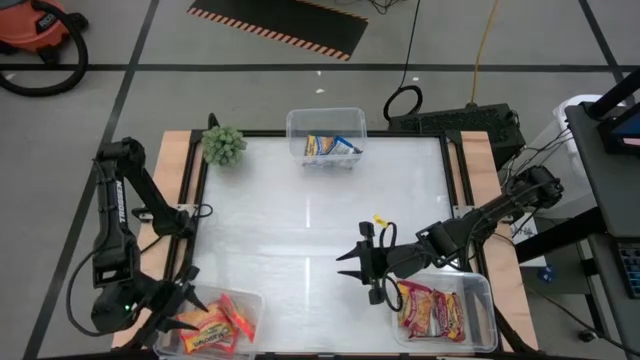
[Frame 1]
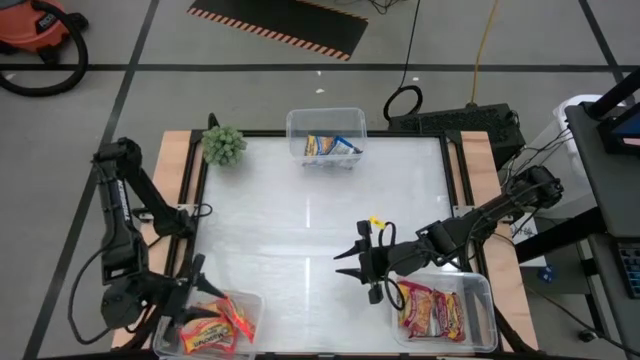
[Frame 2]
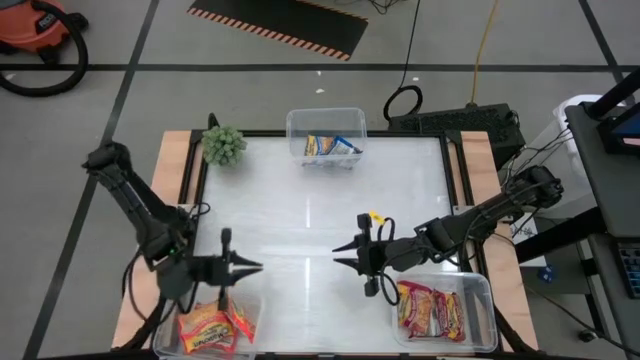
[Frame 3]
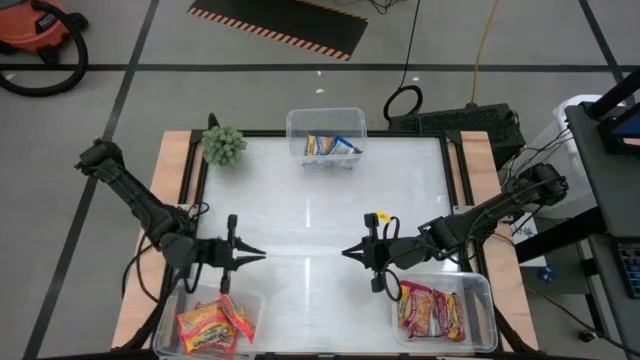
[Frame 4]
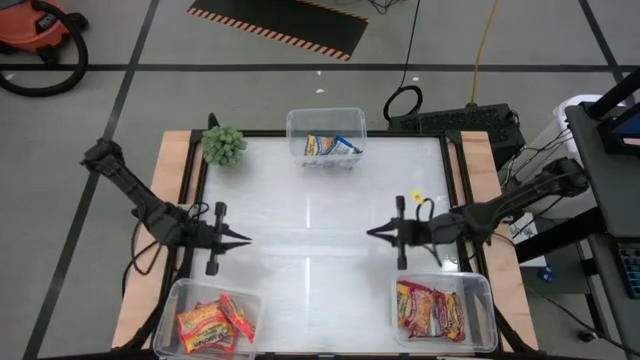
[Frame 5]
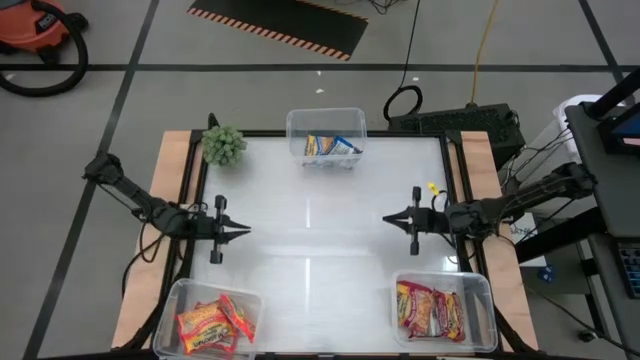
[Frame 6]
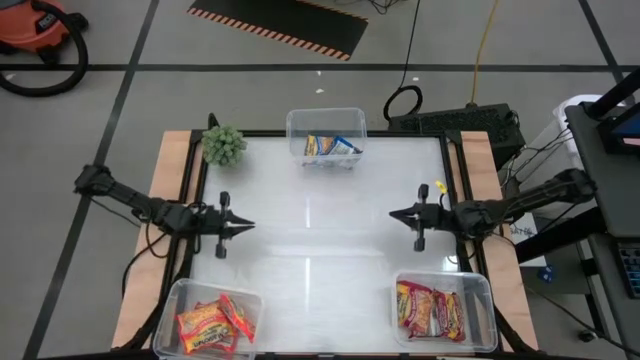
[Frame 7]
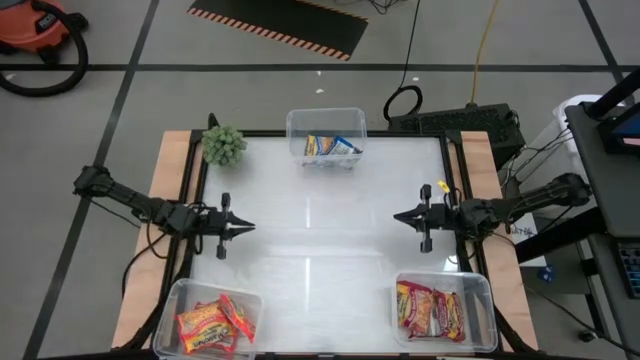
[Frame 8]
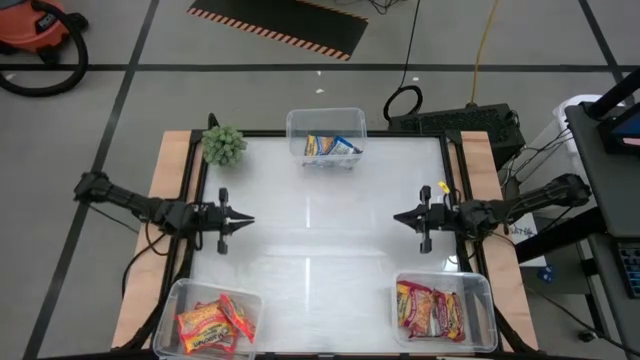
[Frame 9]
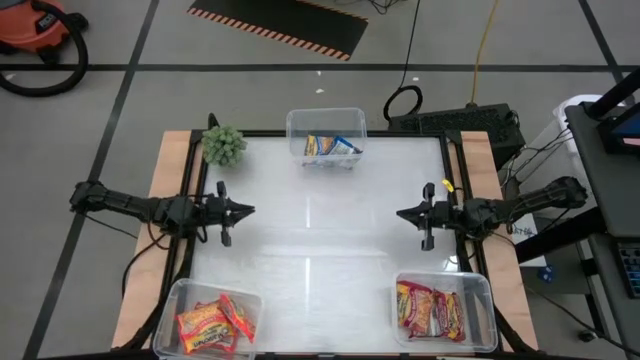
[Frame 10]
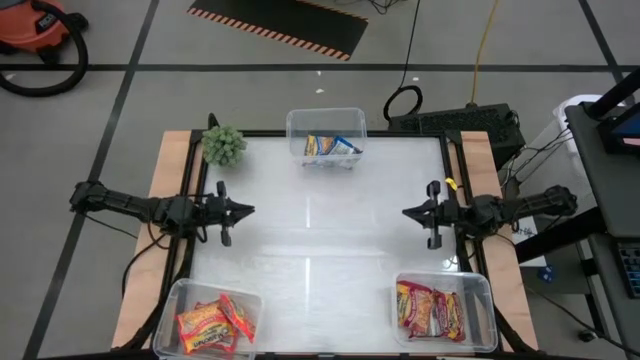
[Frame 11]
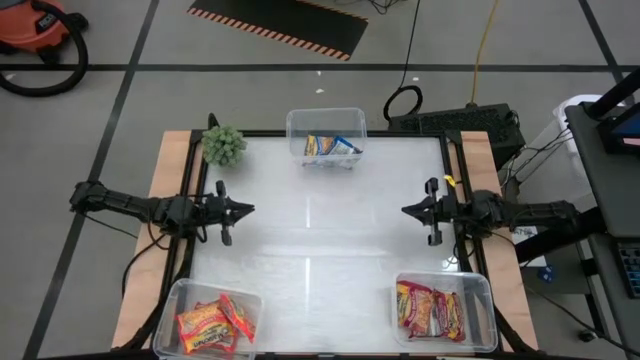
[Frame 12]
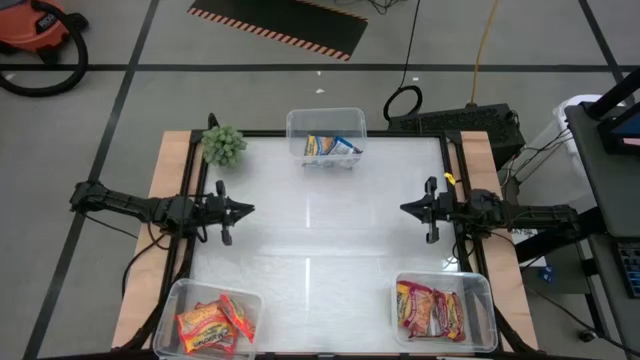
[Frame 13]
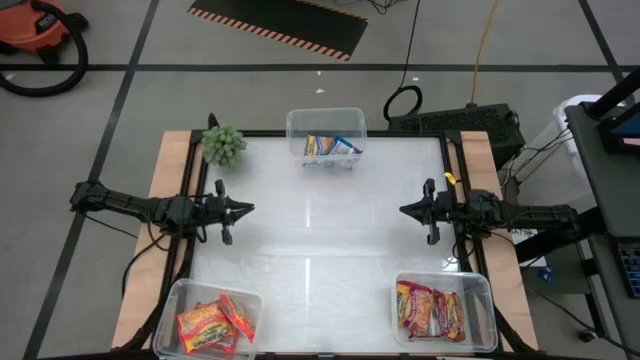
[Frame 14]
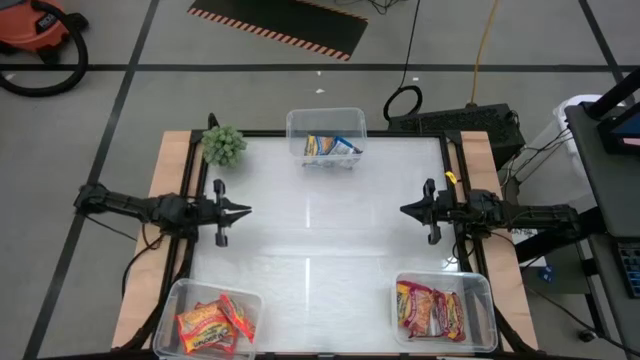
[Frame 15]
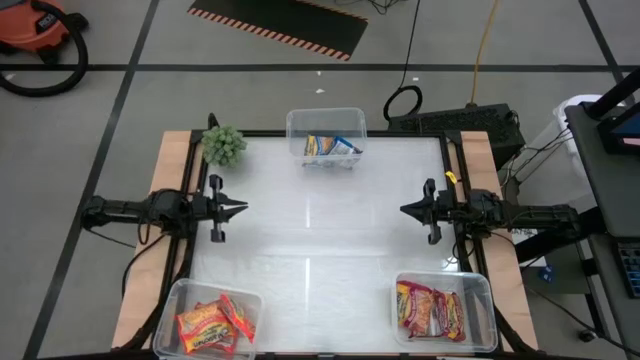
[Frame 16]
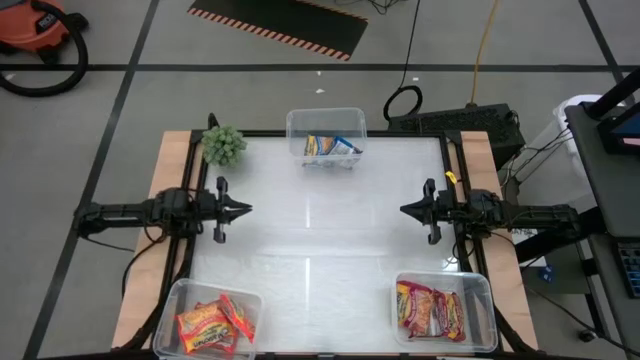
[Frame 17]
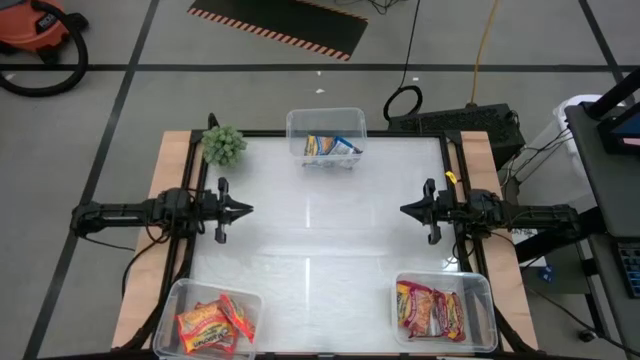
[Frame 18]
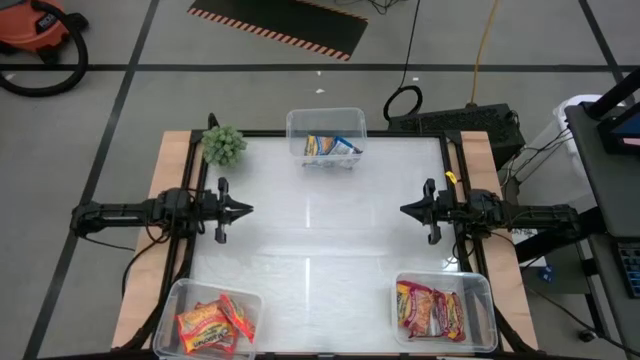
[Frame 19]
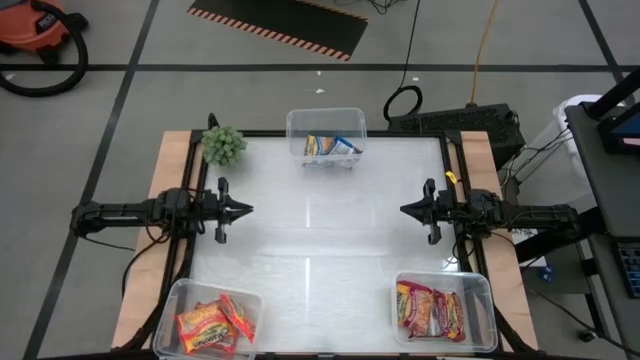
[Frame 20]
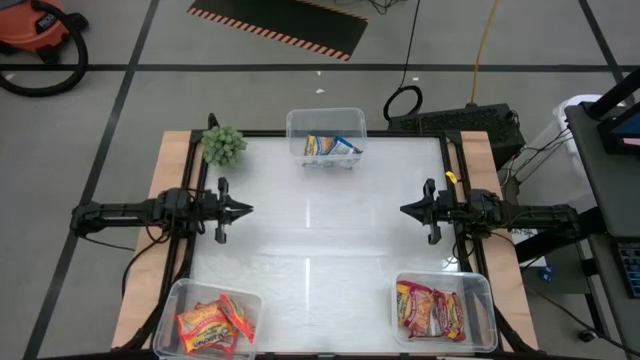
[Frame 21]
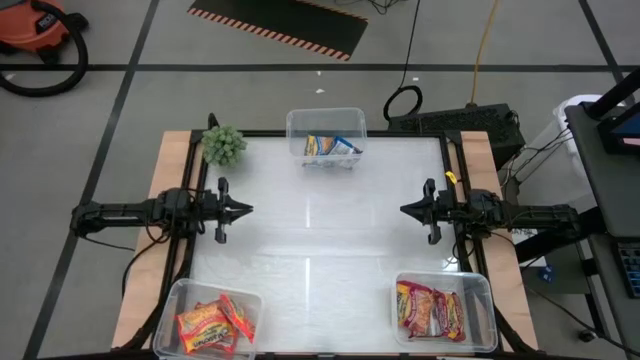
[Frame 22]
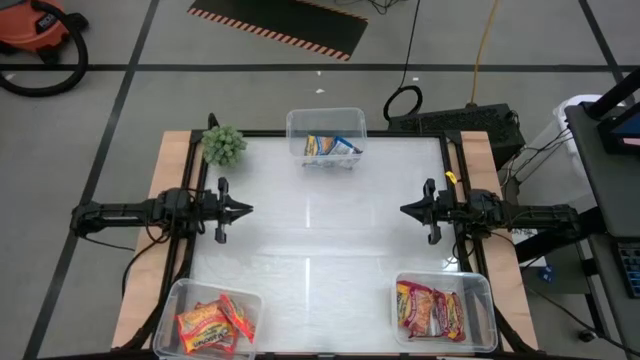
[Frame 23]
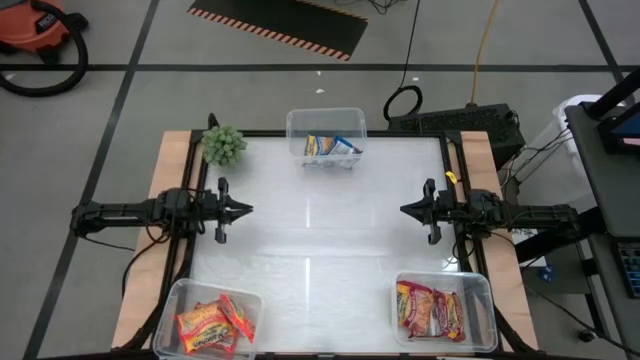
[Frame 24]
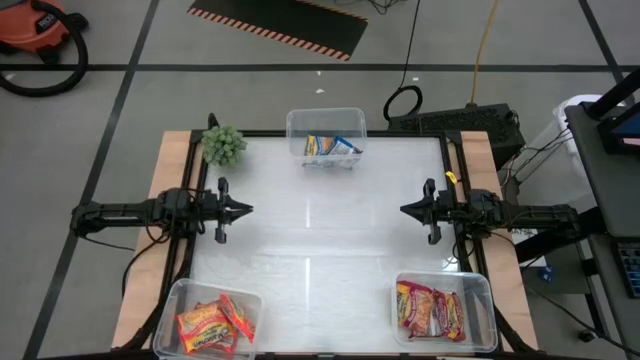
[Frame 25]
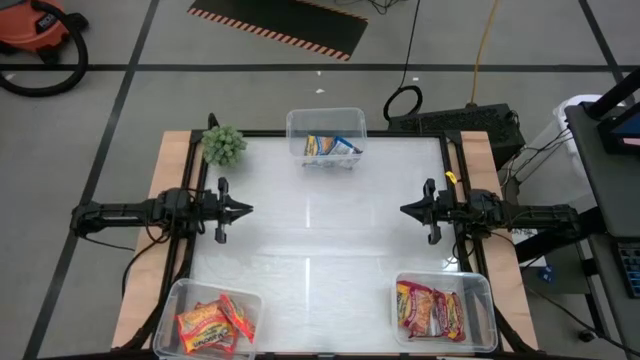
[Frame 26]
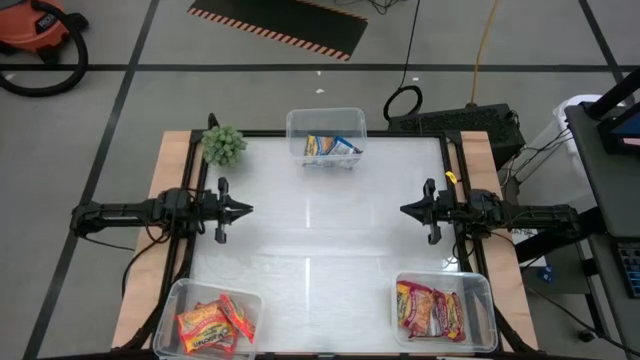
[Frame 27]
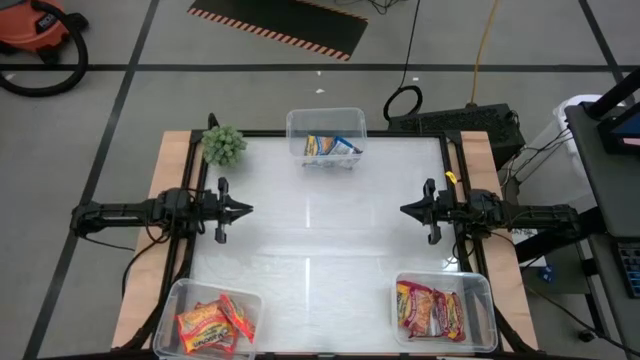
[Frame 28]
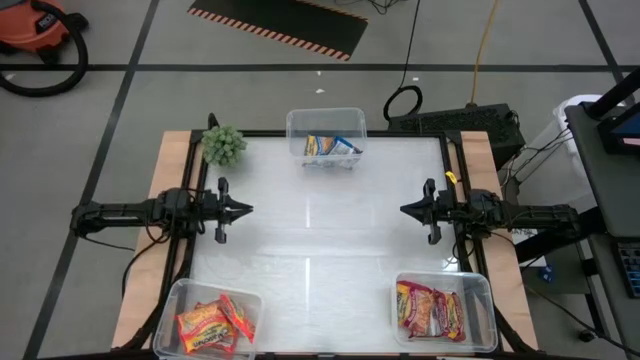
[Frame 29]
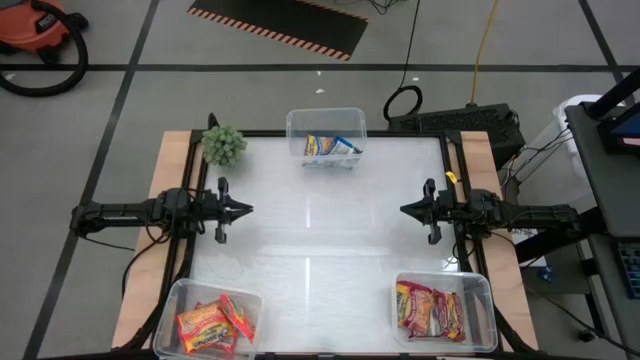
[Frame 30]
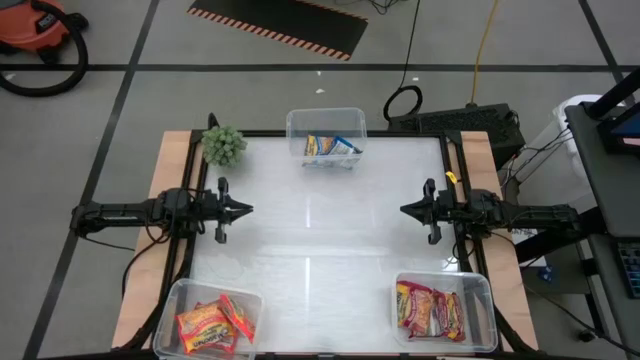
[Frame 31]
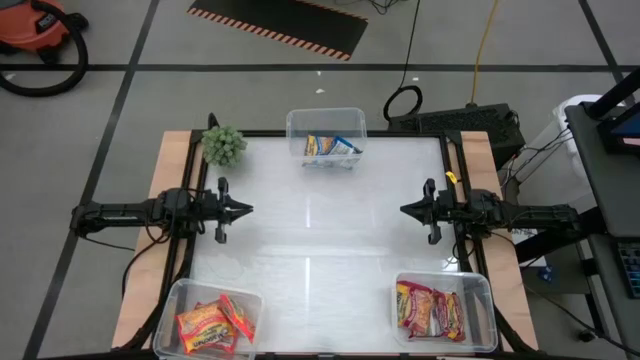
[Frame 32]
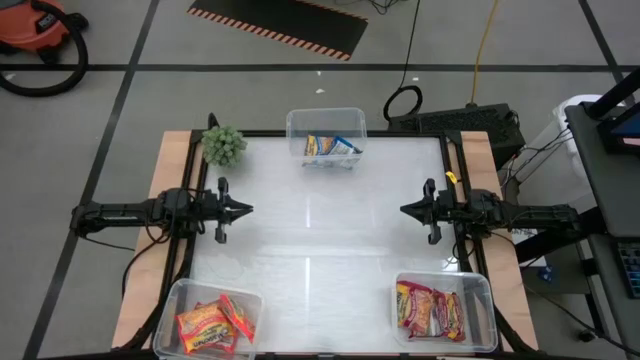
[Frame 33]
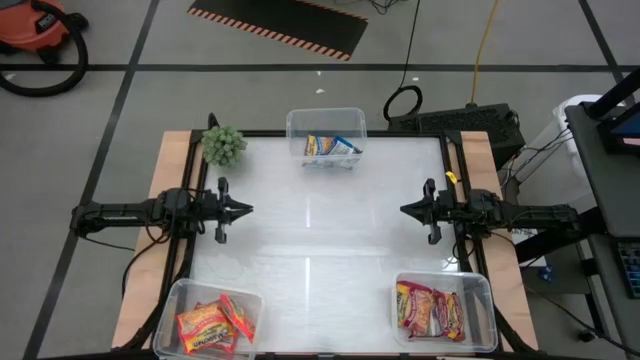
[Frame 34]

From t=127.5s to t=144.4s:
Task: Sort Maruchan noodles
Return to Home Position

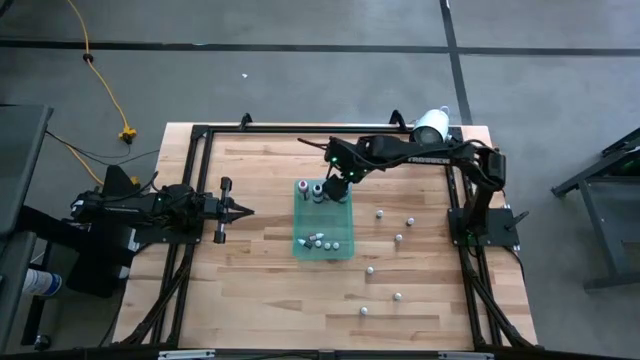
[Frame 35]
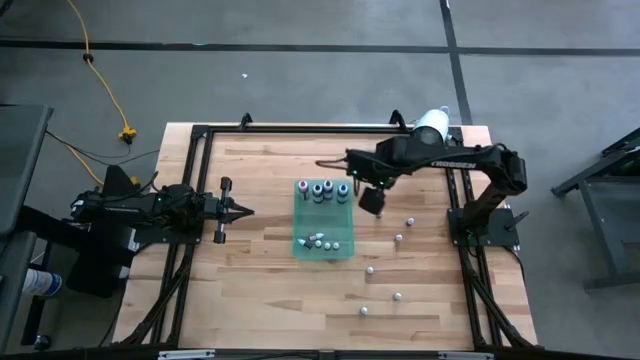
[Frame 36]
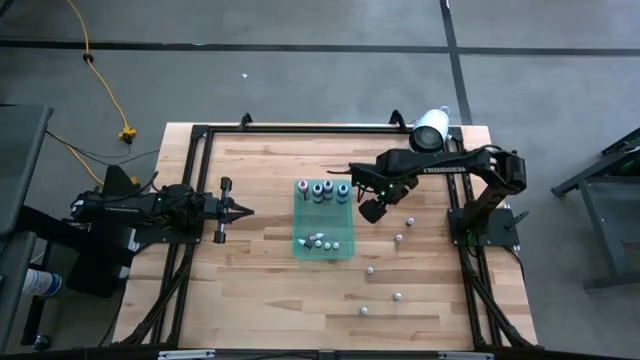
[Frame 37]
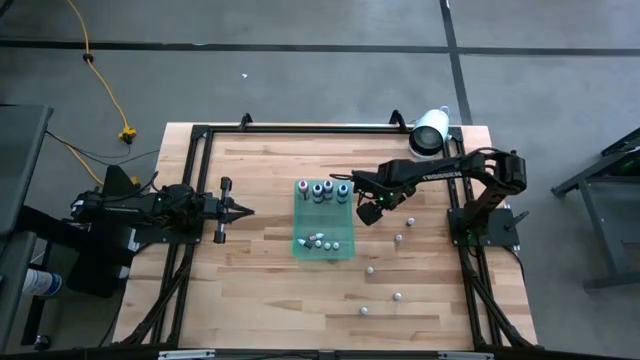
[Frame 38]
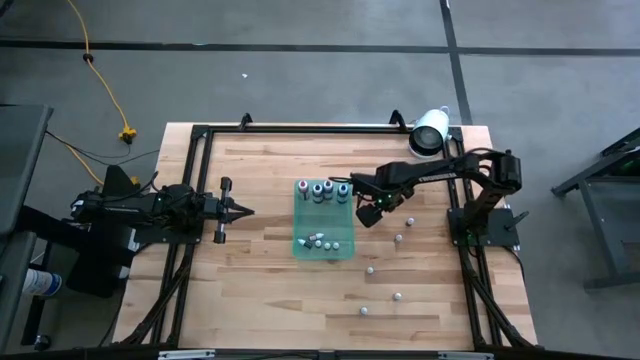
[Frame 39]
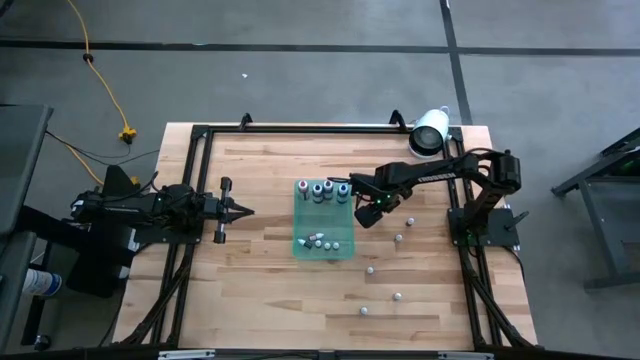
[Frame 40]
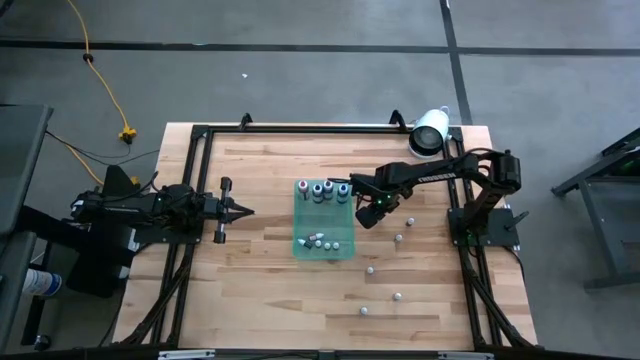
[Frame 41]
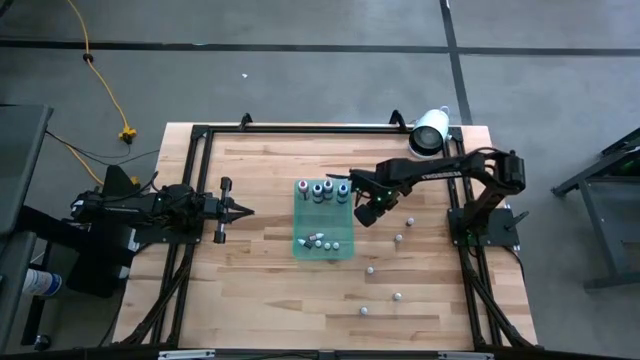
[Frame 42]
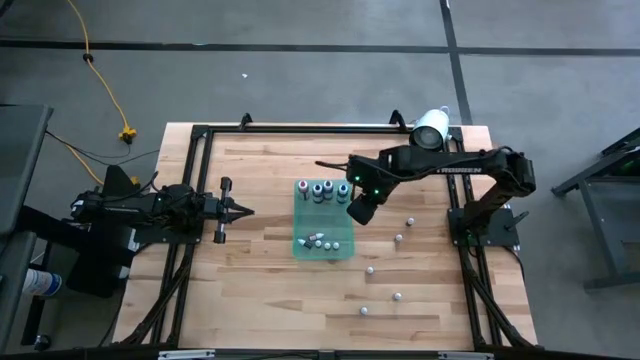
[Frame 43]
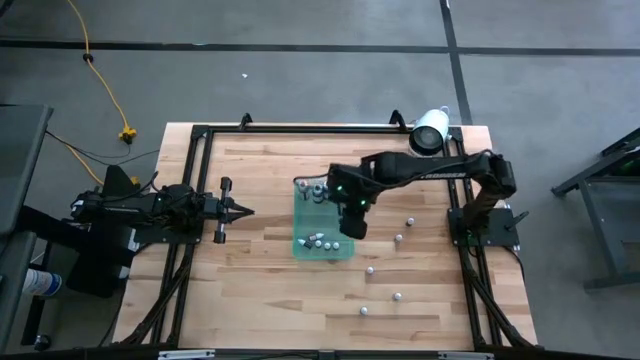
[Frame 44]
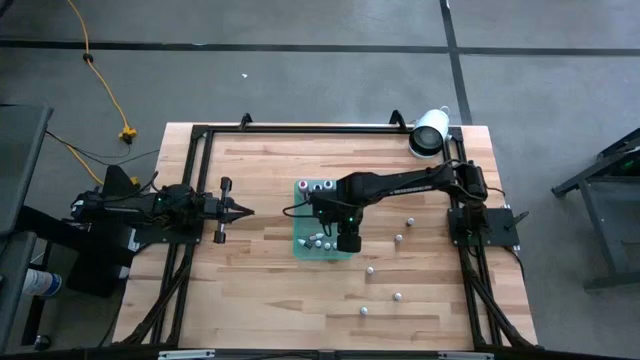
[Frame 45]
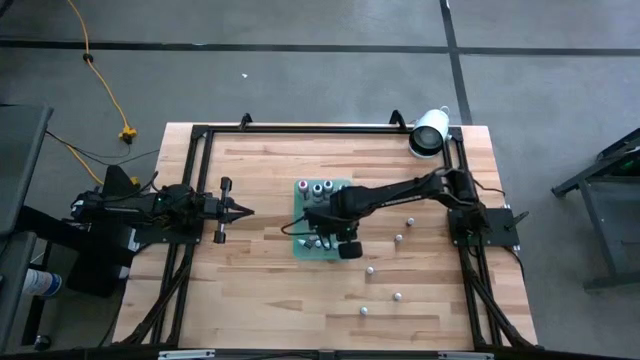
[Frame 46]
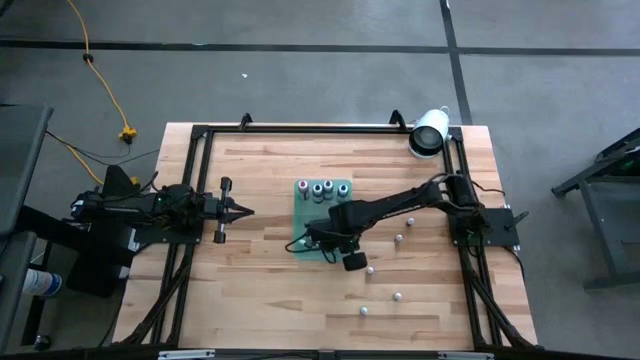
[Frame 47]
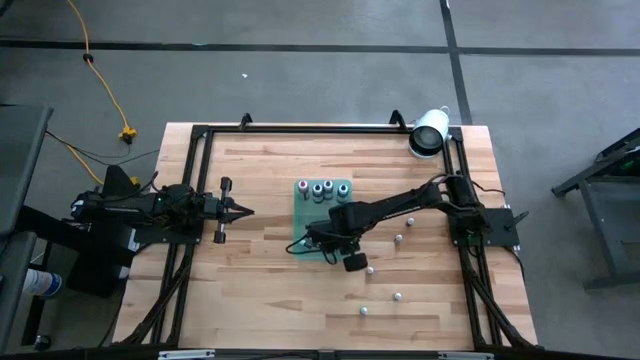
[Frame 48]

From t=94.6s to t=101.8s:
Task: Pick & Place food coloring
Put the small black food coloring bottle into the green bin
